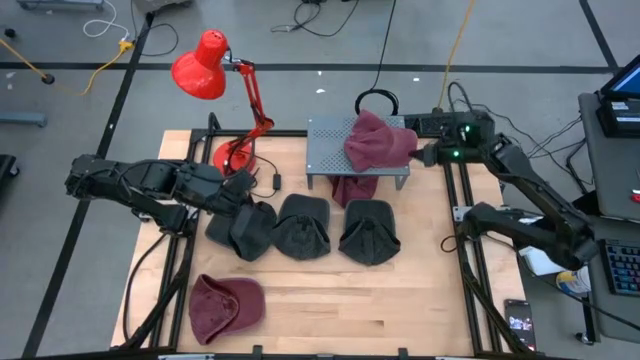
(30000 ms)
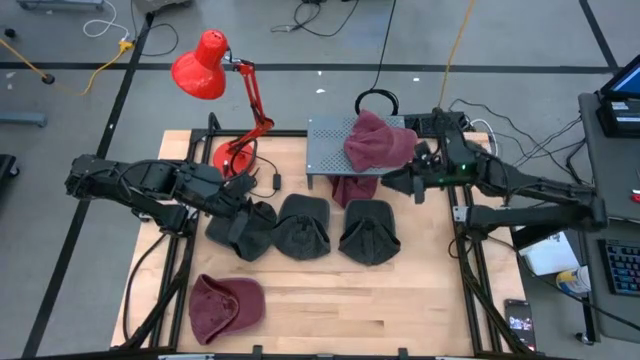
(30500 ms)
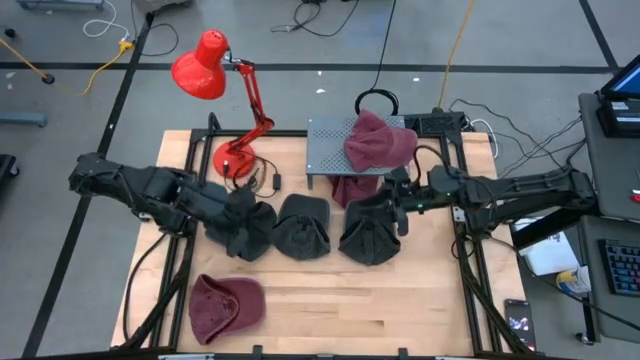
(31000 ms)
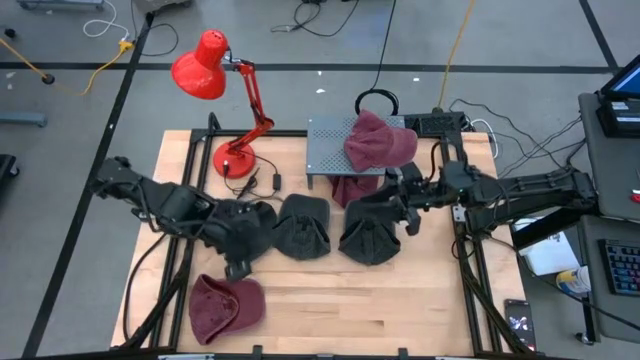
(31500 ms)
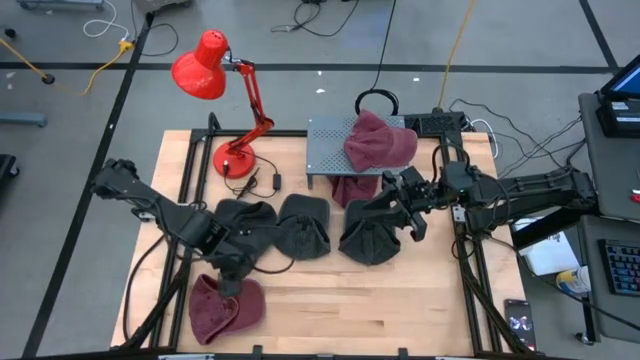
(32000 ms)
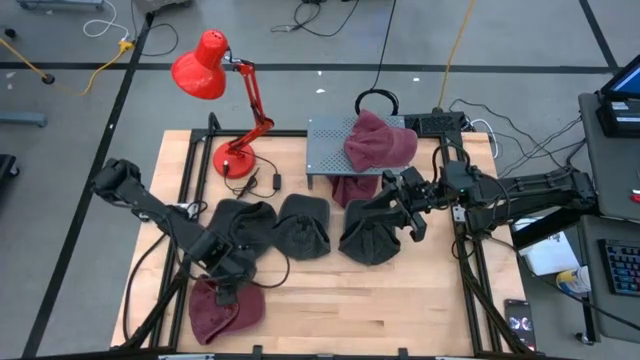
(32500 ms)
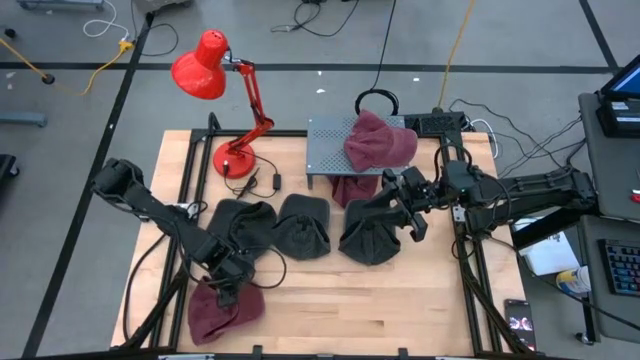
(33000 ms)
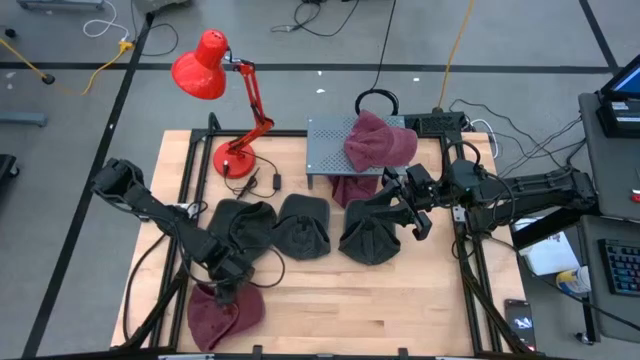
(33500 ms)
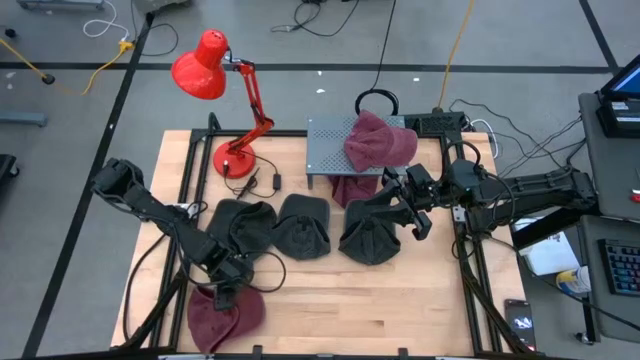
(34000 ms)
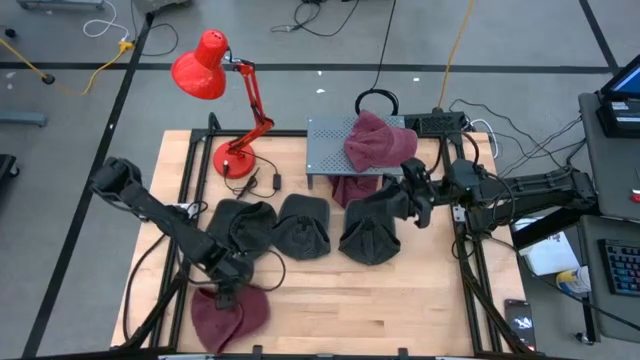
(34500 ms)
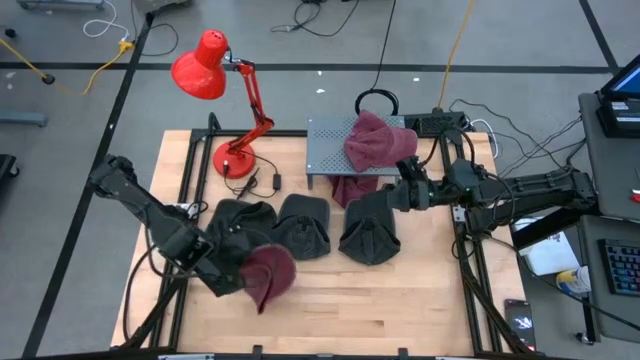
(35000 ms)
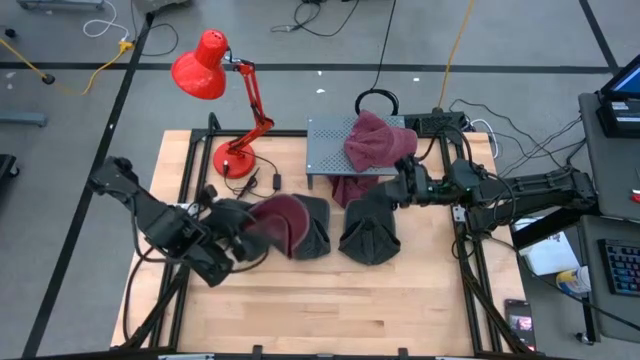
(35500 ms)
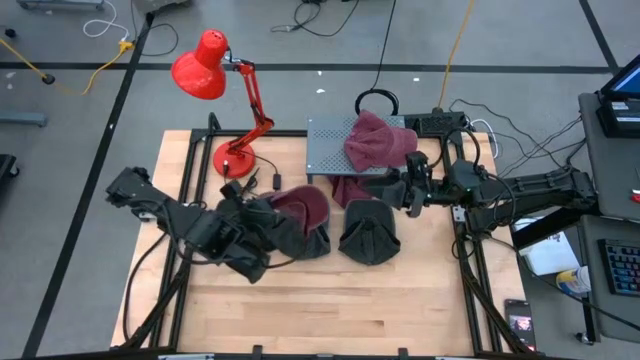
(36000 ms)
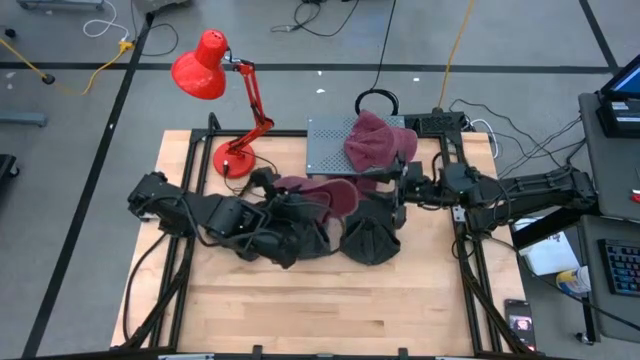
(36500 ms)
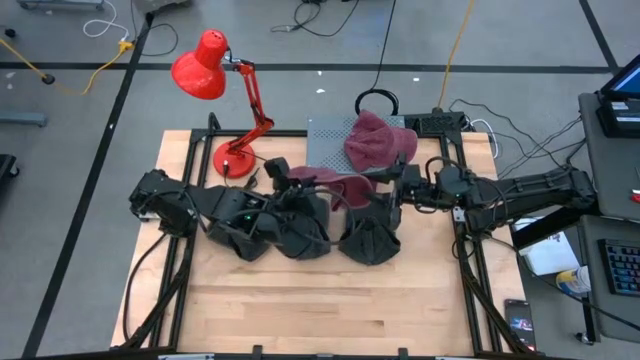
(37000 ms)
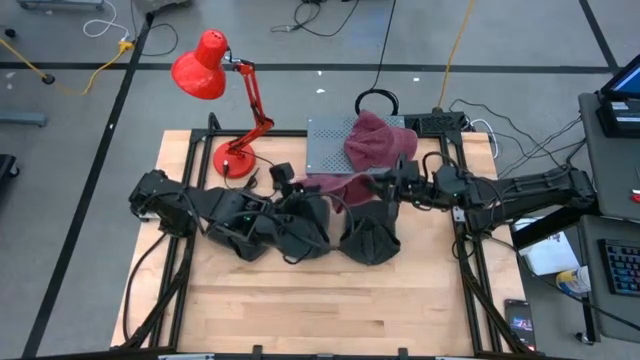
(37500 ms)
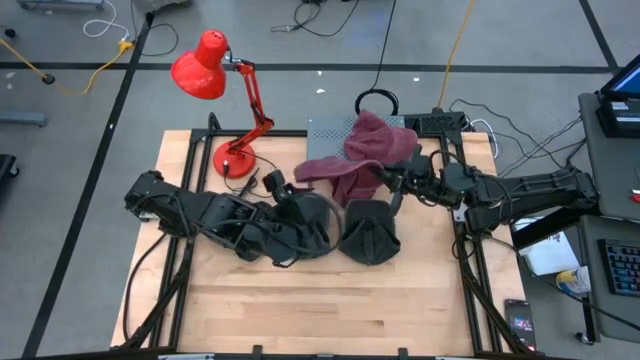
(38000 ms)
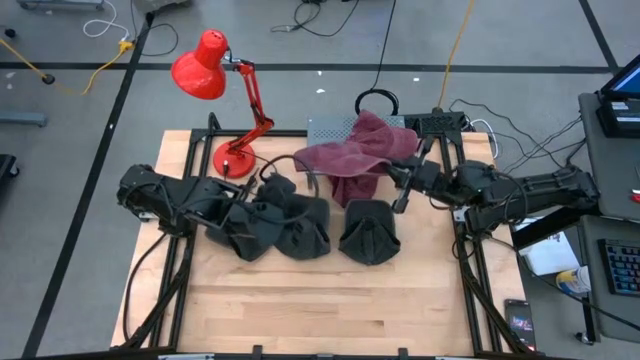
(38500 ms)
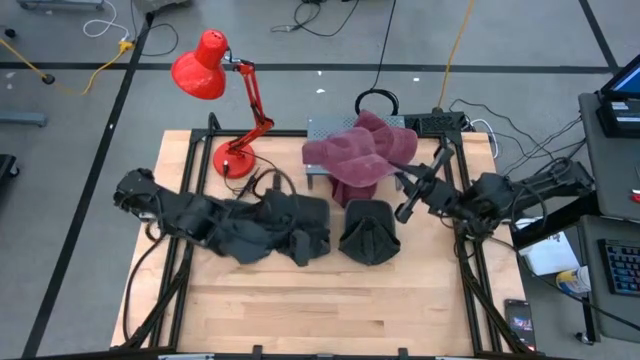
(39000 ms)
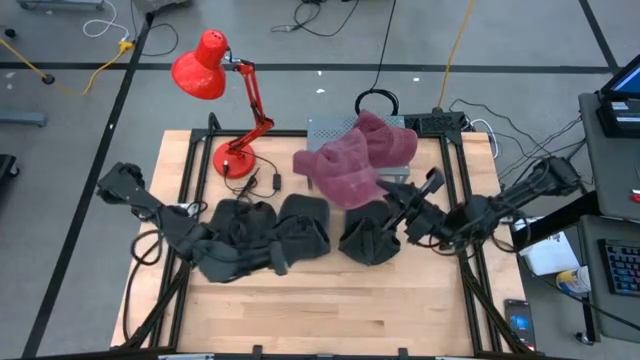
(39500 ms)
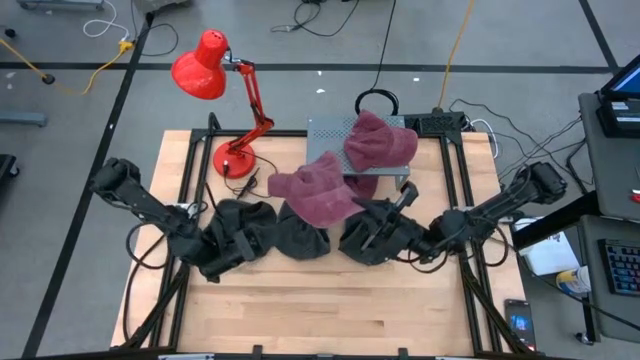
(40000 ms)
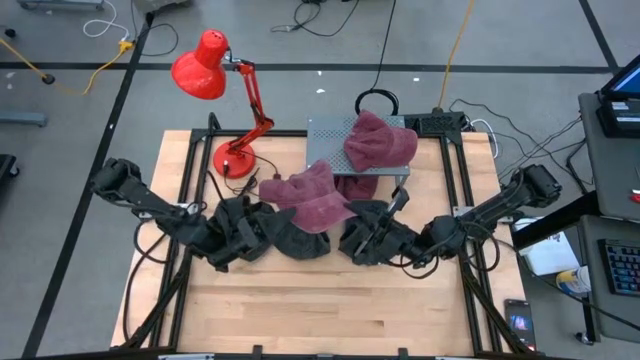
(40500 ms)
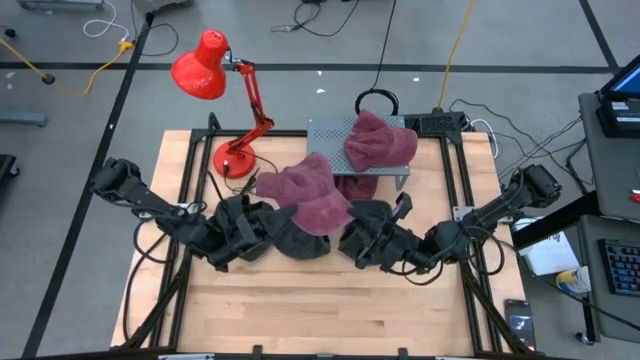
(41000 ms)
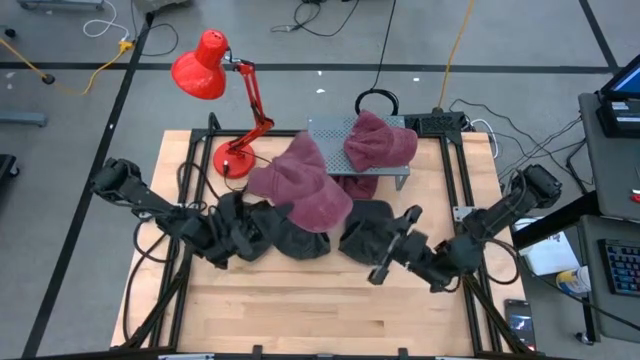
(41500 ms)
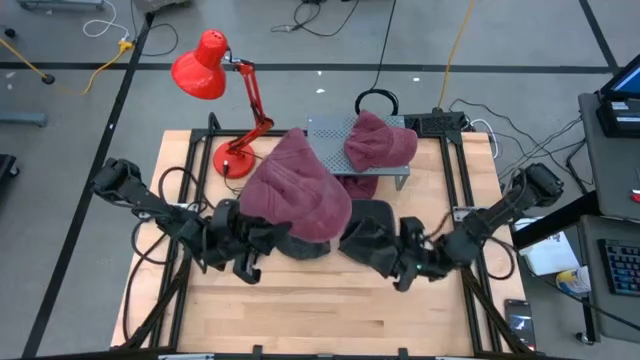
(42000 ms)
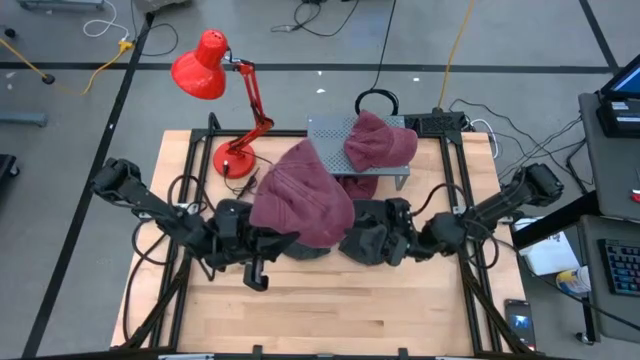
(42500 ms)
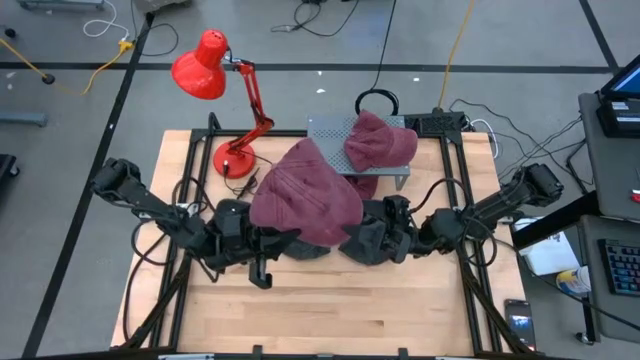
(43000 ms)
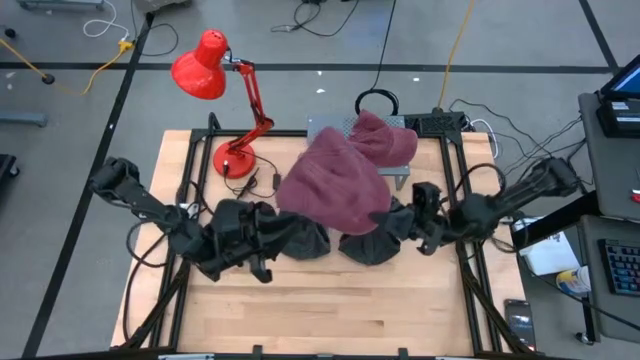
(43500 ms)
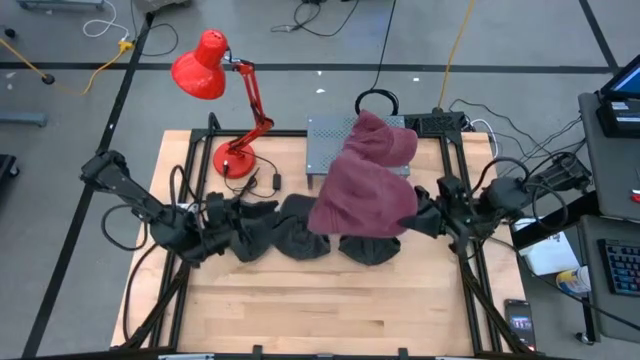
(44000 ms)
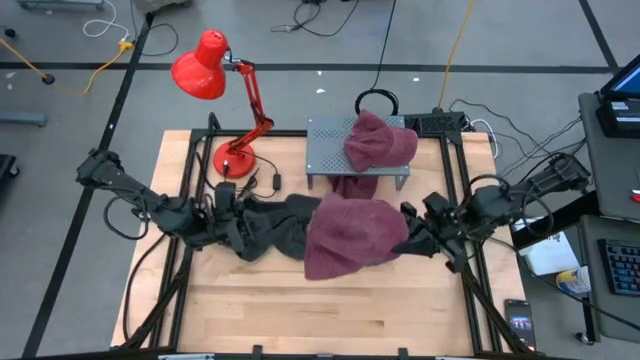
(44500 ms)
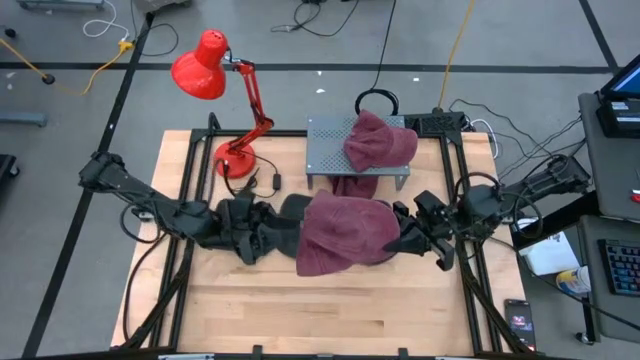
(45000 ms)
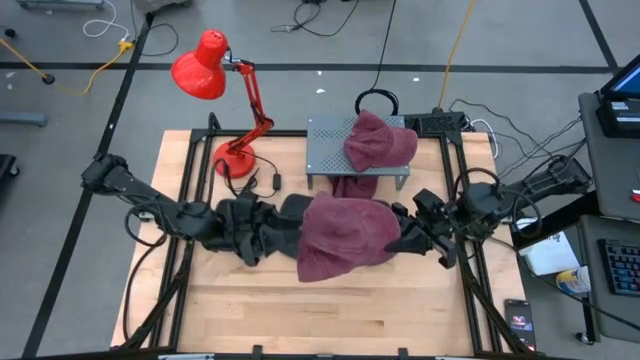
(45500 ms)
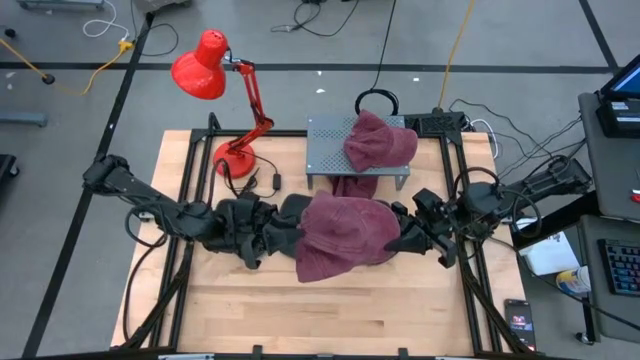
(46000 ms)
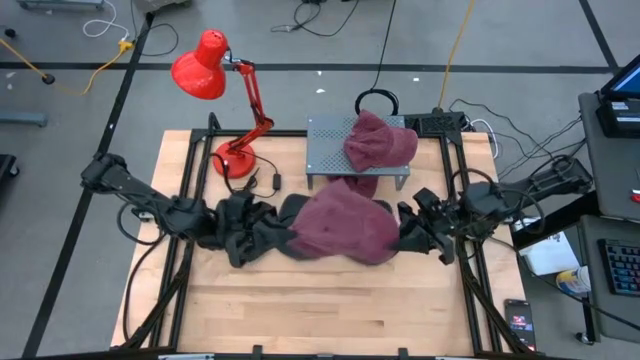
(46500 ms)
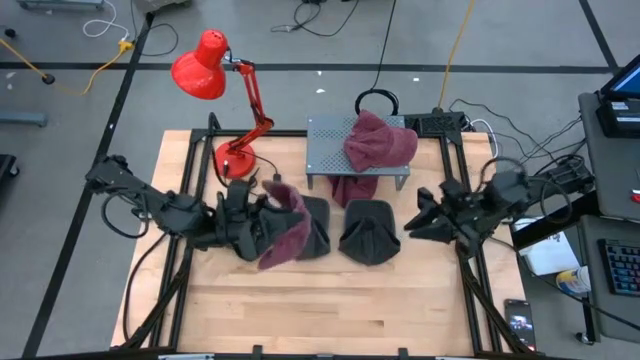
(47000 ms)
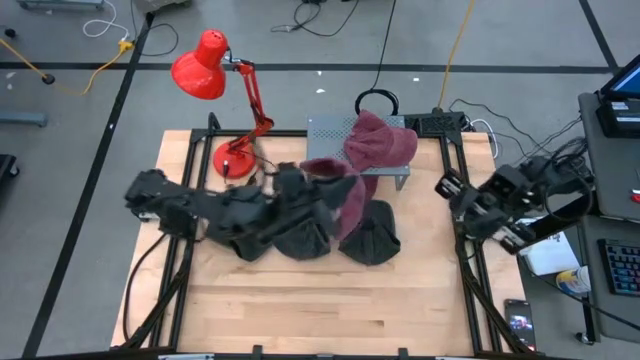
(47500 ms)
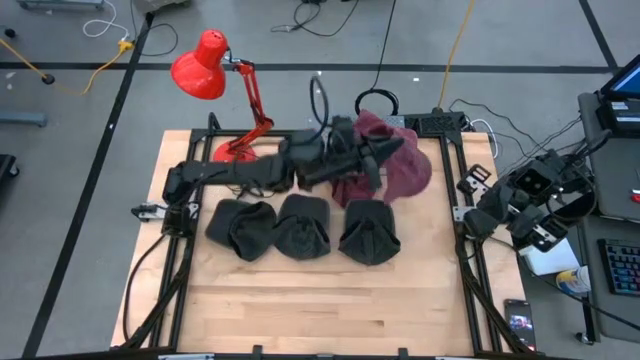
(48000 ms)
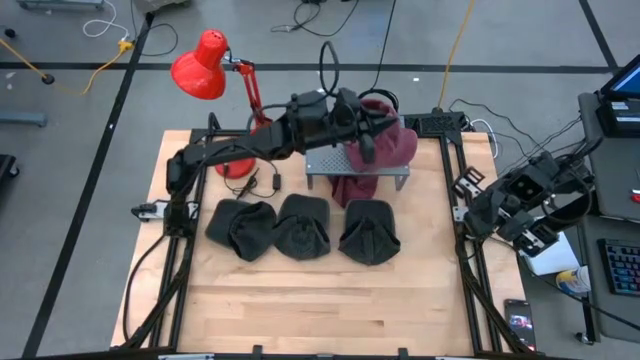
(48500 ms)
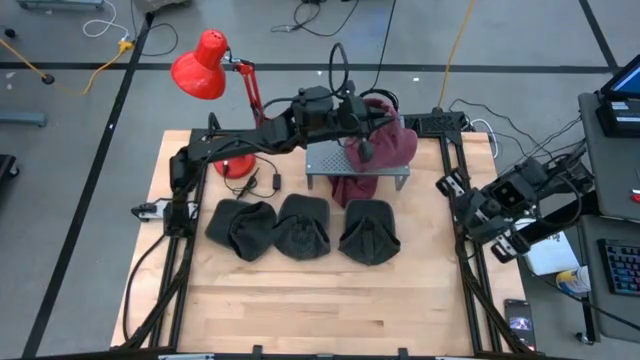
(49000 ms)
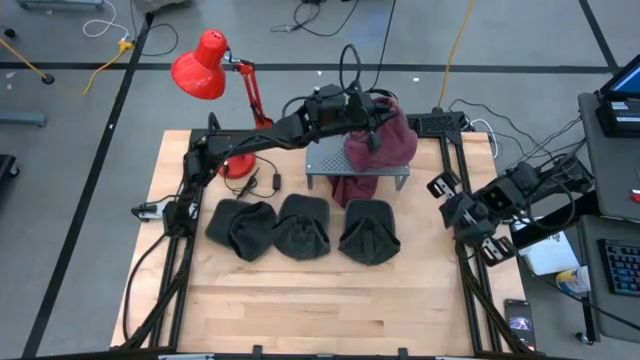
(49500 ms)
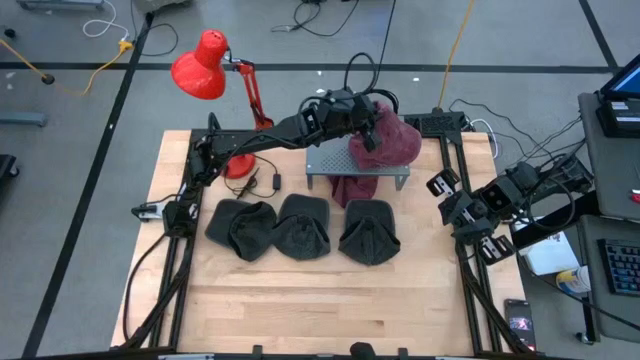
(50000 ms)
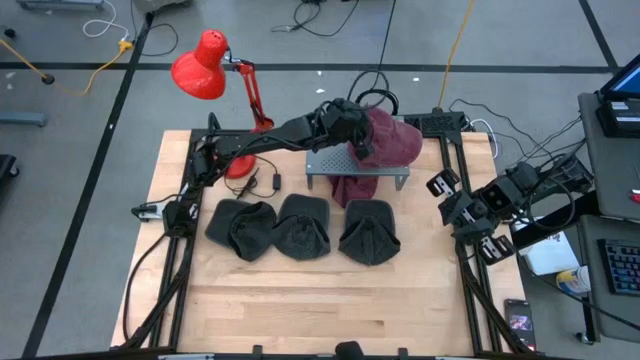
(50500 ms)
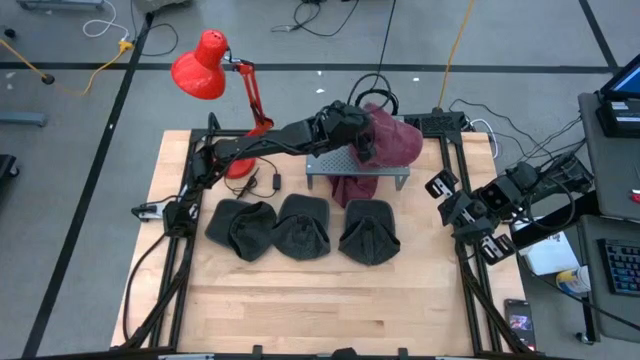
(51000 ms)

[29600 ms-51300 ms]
Task: Pick & Place hat
Stack the bottom red cap on the red cap on the shelf
